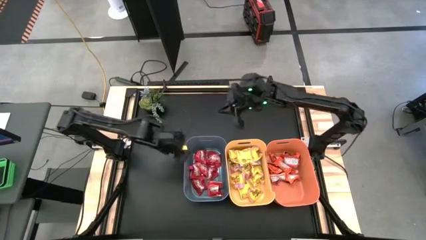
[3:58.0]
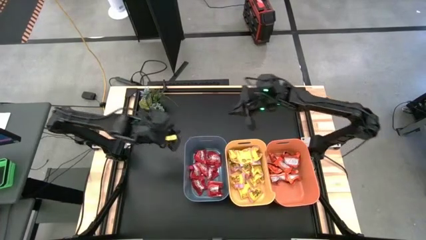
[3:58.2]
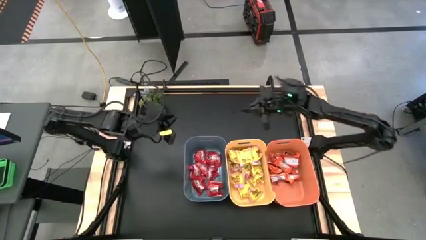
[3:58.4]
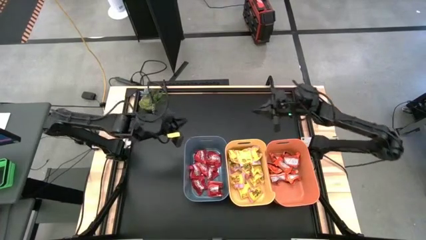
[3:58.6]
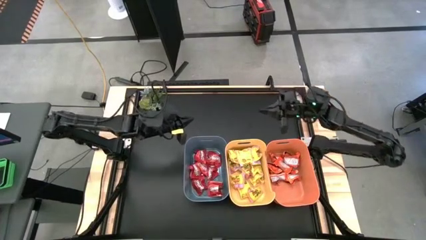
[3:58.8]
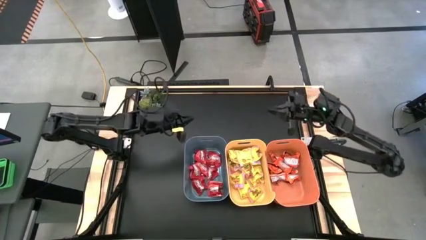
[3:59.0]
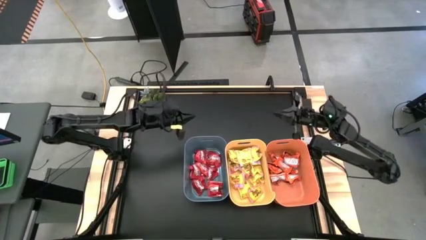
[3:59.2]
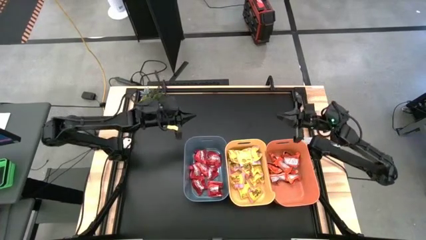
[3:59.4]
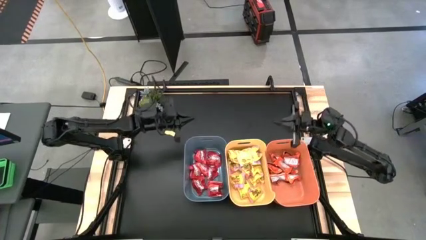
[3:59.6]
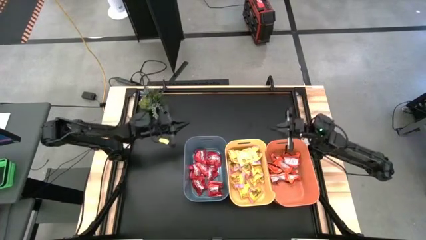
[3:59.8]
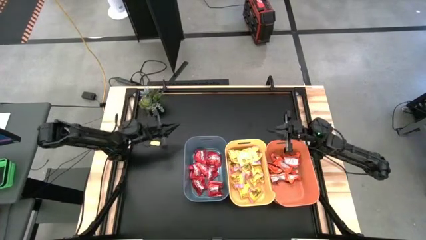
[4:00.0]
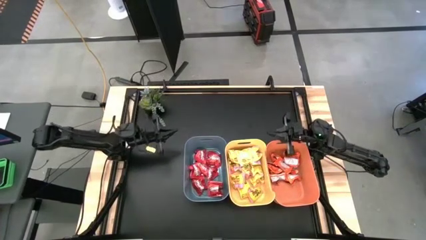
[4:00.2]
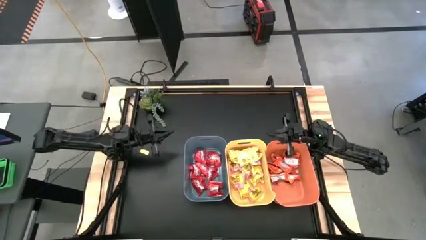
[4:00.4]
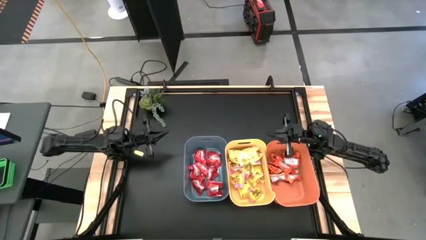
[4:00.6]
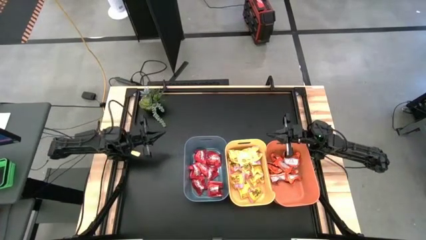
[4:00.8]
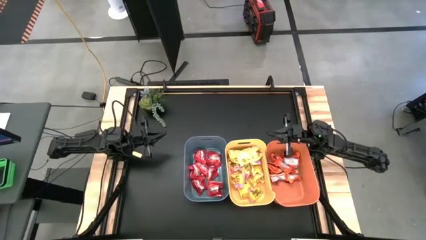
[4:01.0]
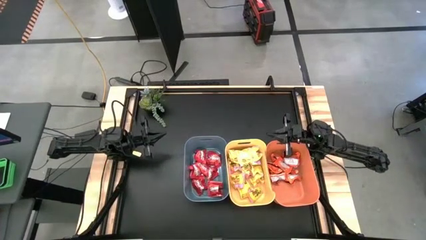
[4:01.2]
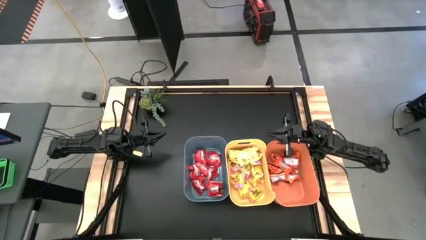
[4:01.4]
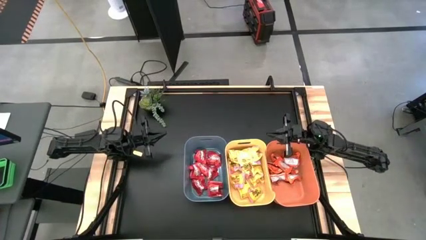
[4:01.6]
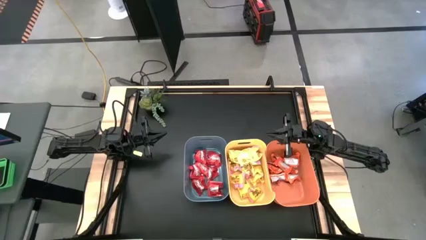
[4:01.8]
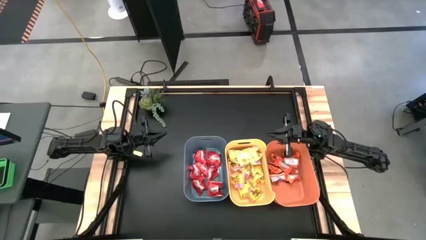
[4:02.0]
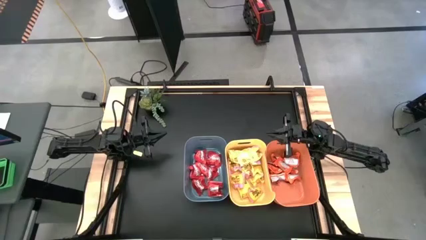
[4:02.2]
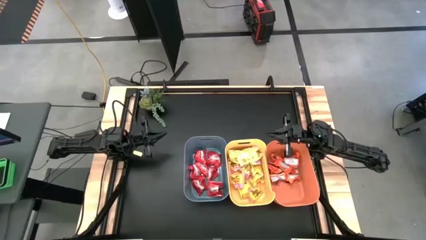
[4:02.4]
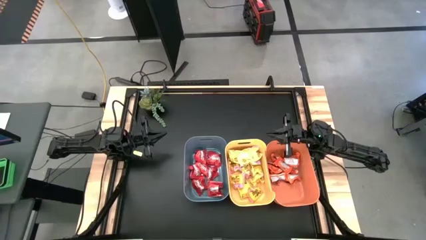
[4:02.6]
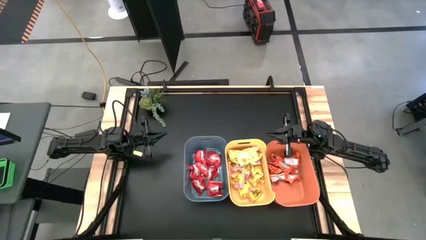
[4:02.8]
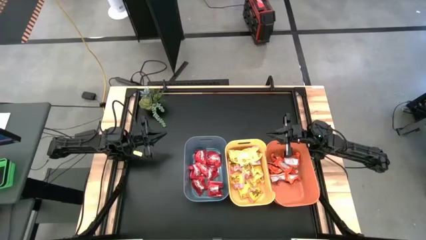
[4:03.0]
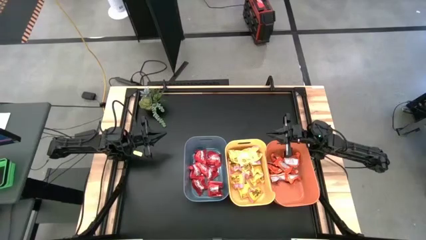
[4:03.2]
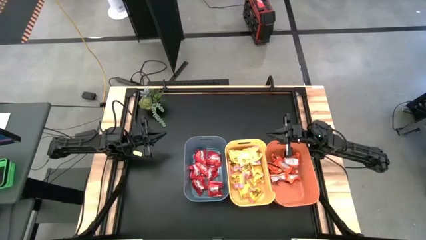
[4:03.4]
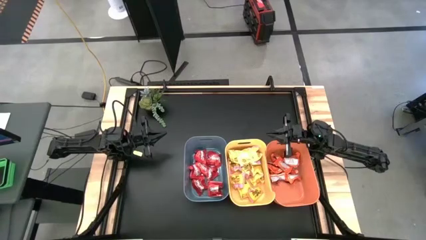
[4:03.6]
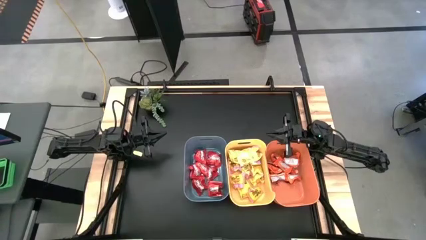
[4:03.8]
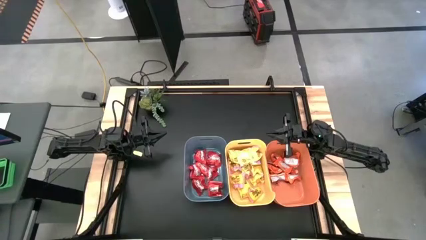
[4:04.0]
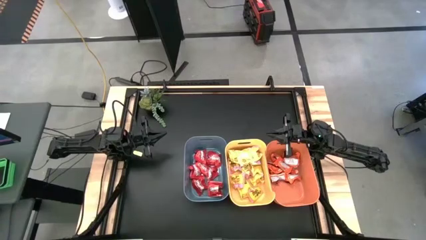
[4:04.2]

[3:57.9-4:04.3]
Task: Sort candy
Return to Home Position

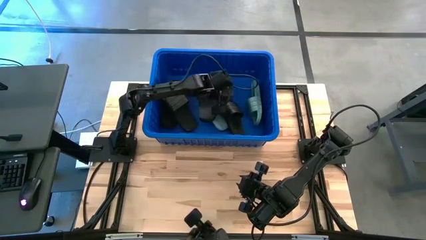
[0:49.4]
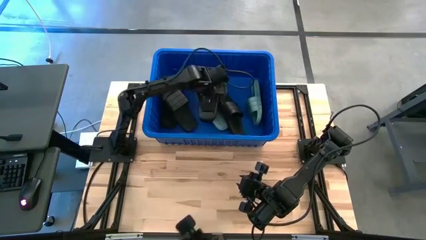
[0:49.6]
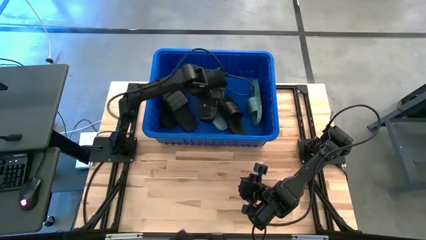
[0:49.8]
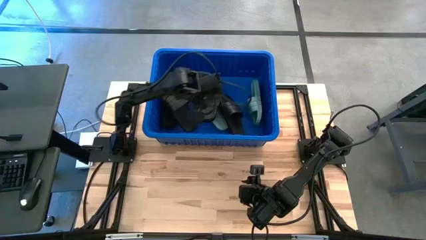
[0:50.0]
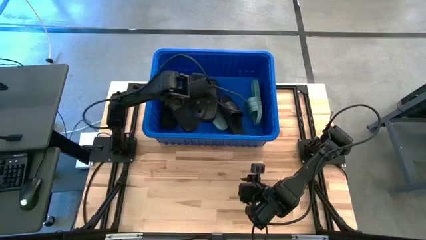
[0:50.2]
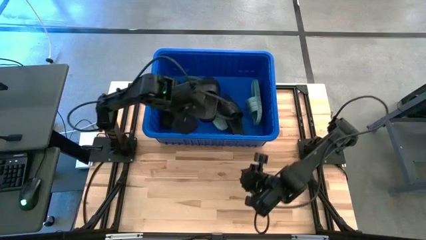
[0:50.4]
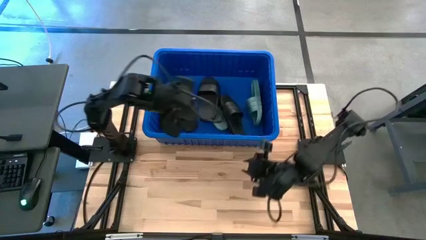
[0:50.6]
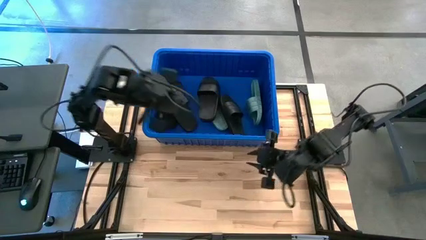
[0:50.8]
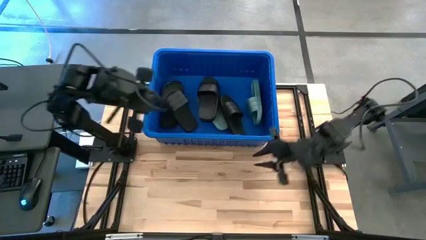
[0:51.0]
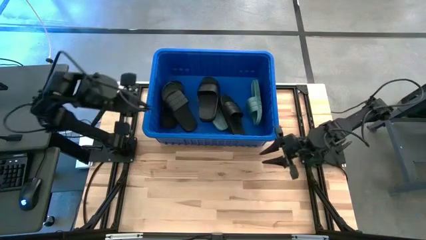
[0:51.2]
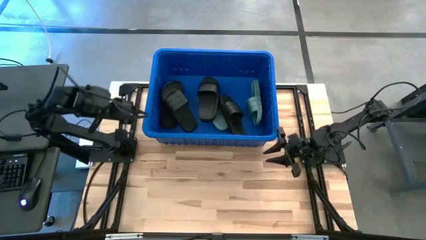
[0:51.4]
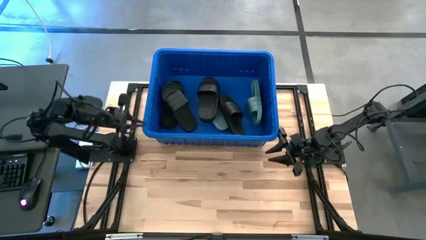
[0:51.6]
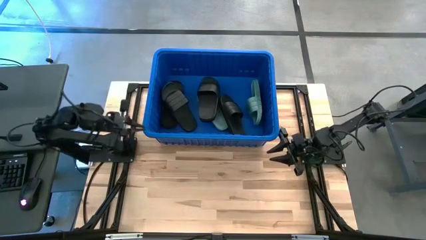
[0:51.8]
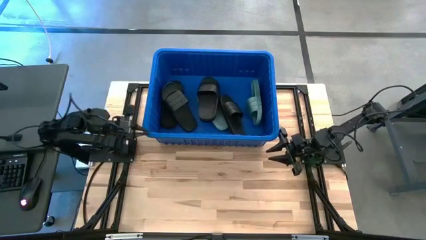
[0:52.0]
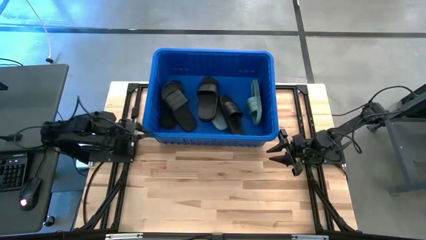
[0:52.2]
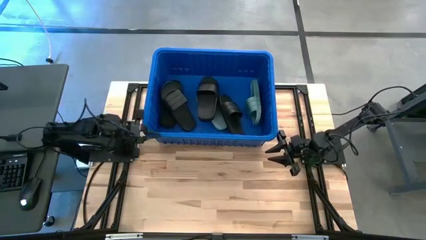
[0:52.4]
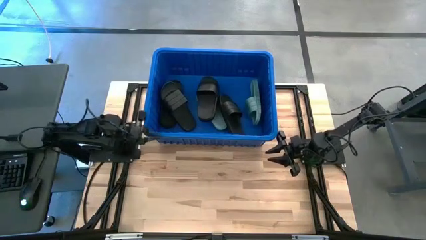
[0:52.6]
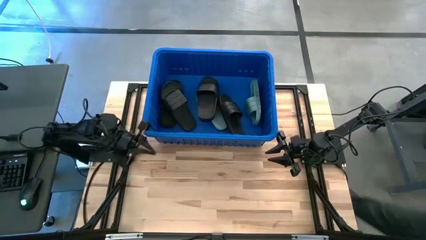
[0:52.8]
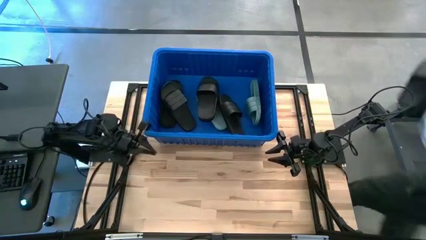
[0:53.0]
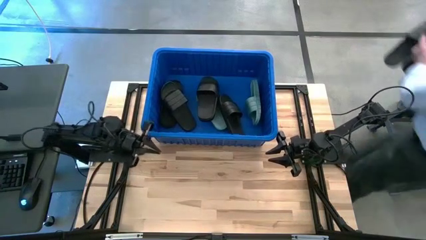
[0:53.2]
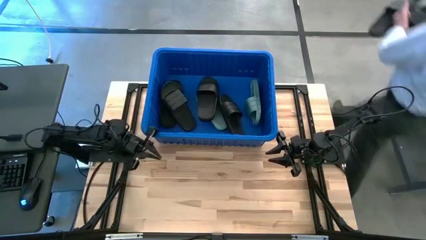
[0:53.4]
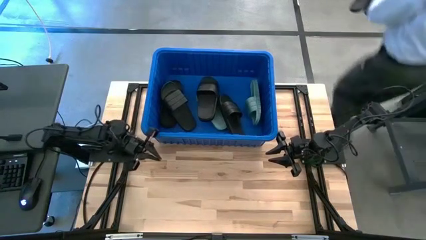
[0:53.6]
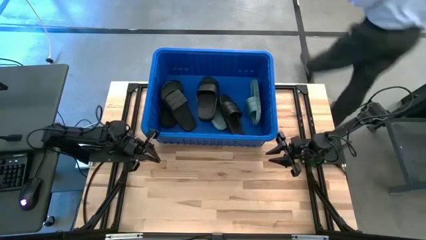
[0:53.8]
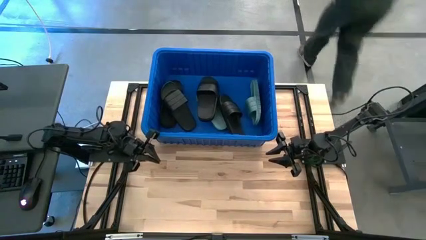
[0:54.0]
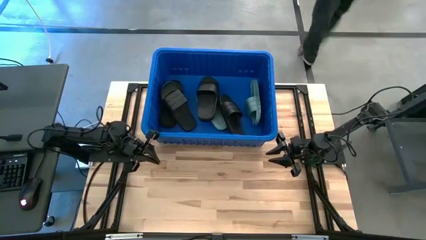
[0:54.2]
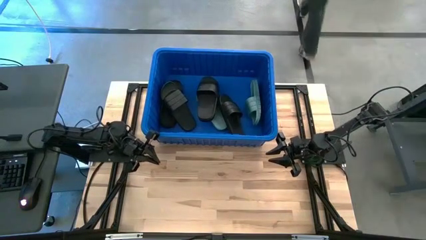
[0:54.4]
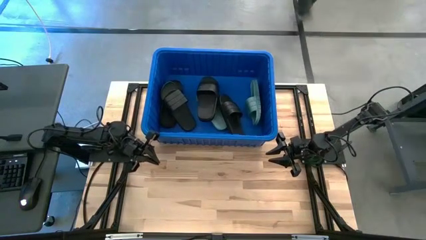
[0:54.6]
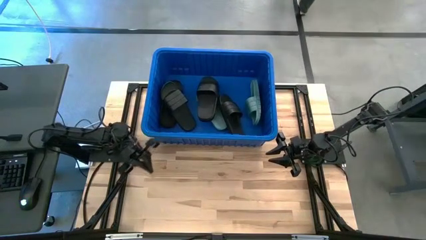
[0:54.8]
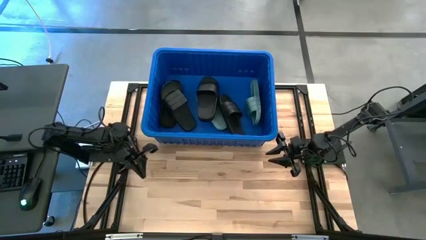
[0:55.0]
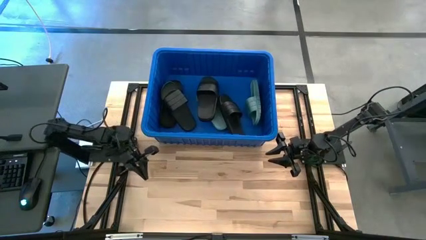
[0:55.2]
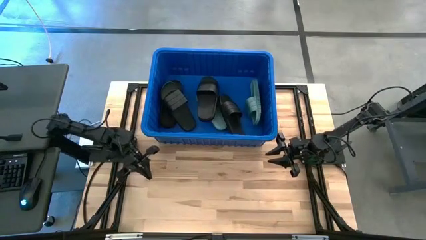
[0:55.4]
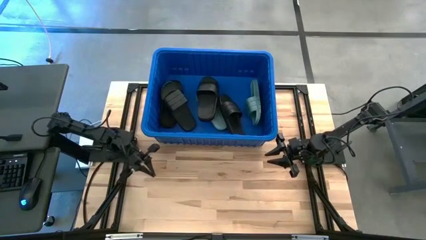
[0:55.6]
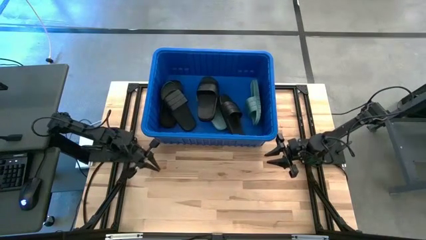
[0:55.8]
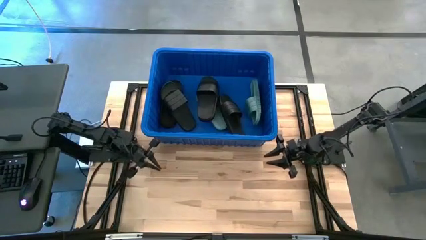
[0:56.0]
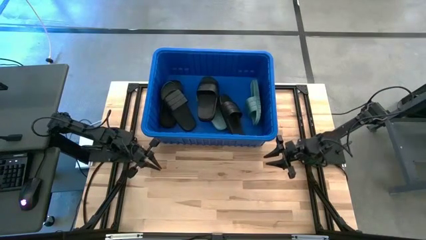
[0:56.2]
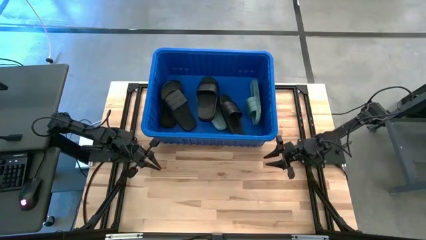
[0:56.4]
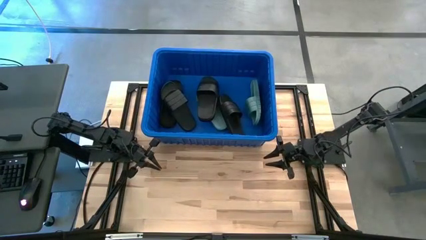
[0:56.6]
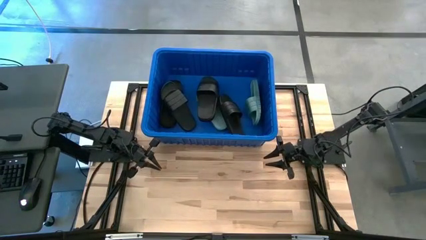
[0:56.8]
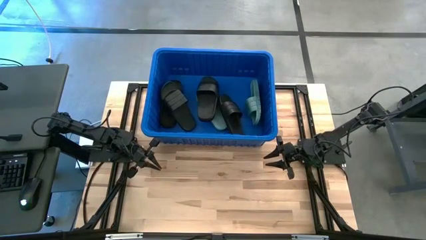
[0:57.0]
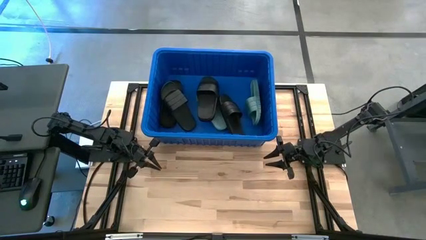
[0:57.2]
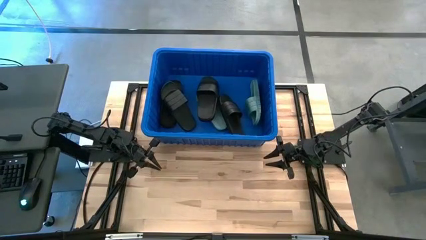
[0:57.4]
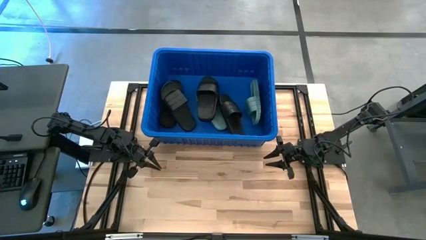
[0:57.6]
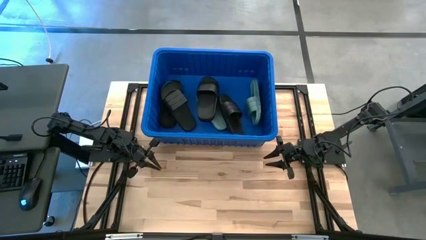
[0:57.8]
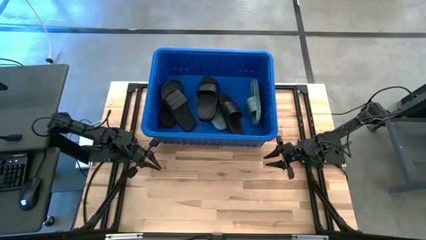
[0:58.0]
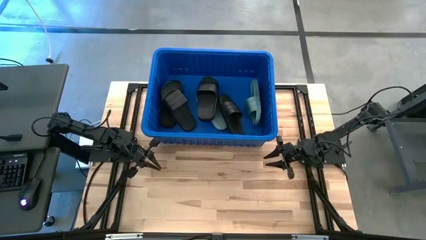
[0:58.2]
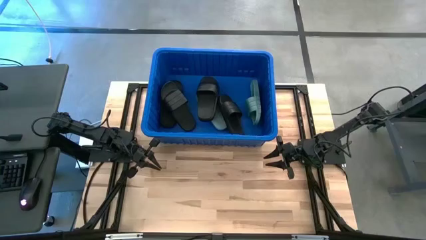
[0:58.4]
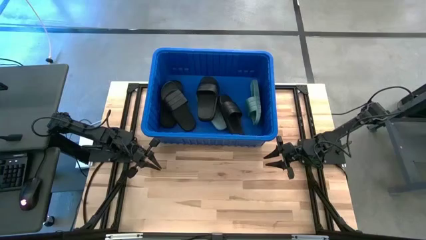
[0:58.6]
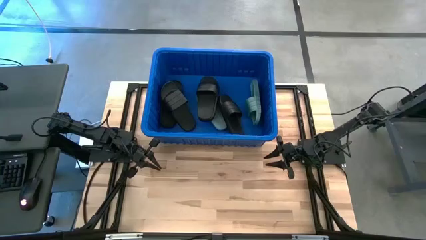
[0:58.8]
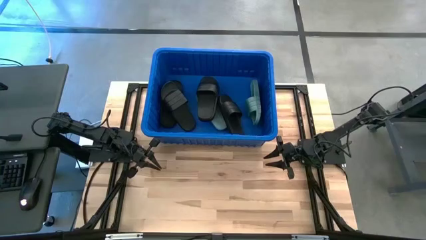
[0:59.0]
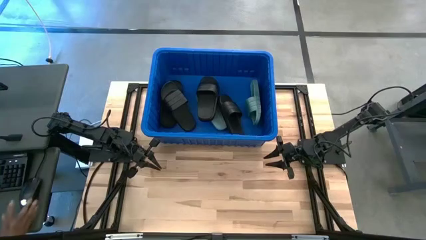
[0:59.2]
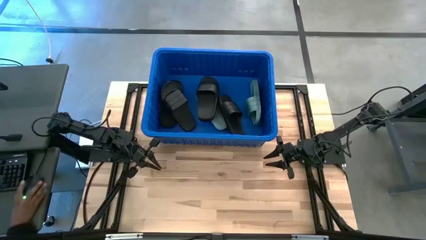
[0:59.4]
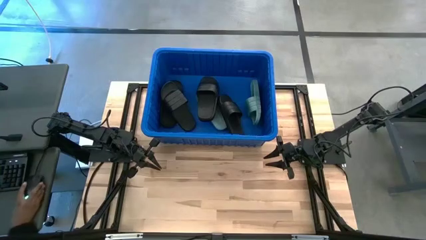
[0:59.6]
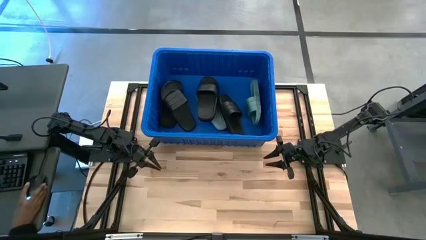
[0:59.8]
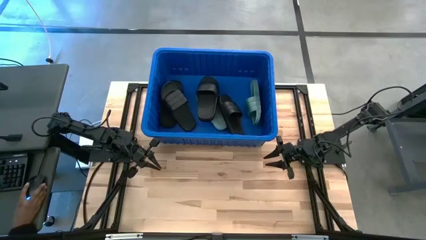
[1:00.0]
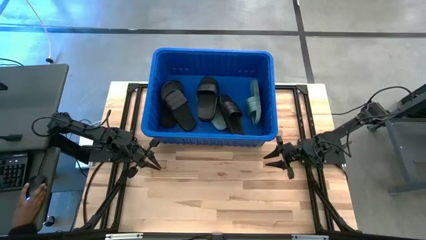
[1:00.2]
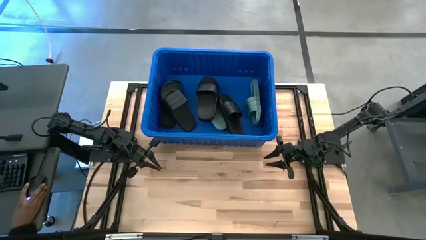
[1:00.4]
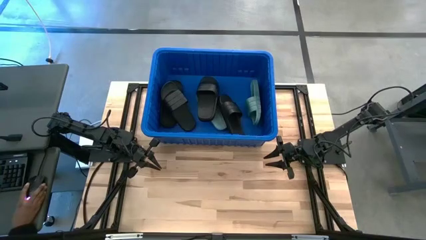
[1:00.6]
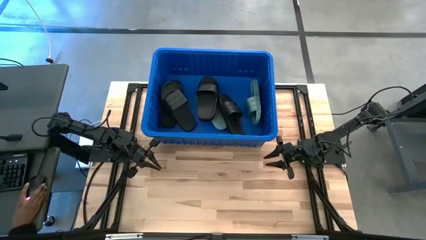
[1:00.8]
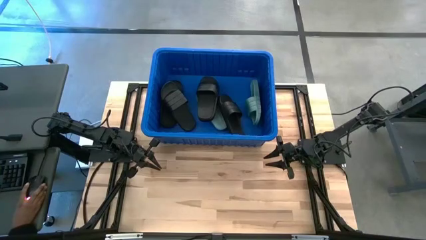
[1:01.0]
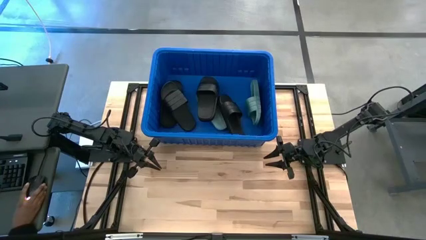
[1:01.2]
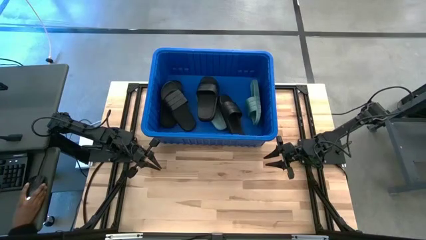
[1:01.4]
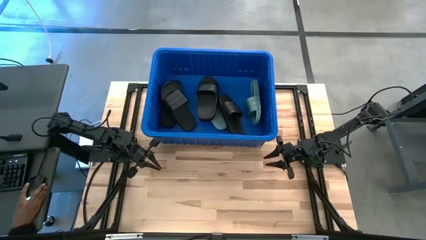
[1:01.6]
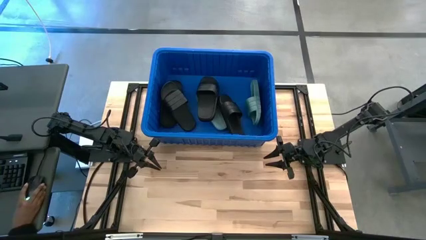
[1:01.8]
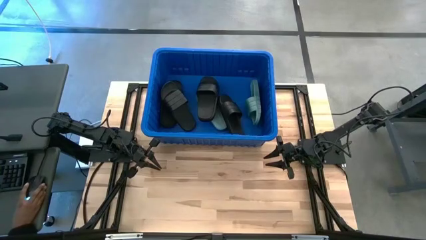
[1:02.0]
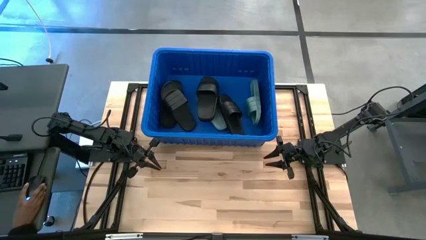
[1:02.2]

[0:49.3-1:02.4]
Task: Pick and place slides into bin
Return to Home Position
